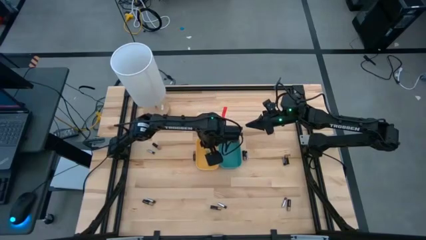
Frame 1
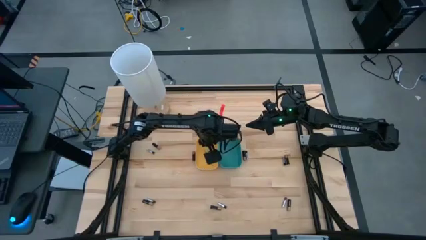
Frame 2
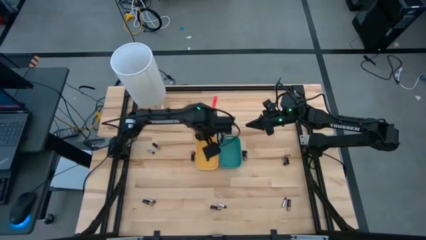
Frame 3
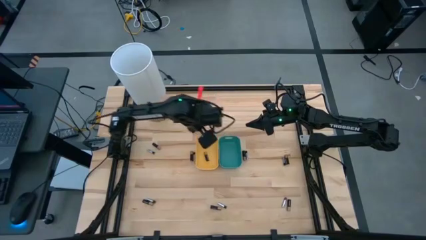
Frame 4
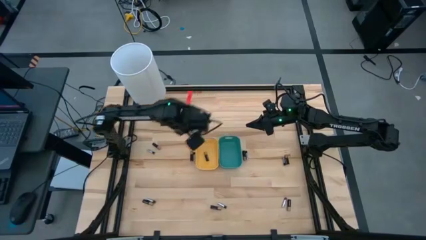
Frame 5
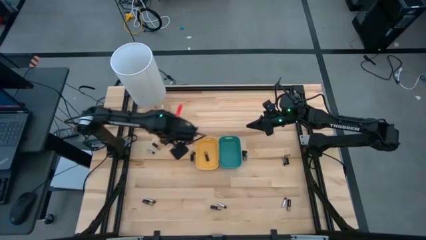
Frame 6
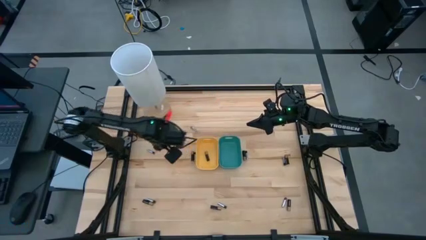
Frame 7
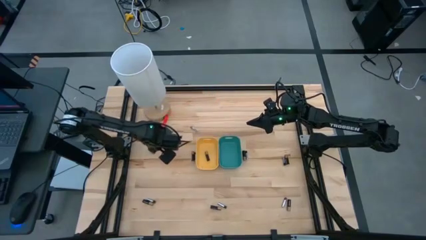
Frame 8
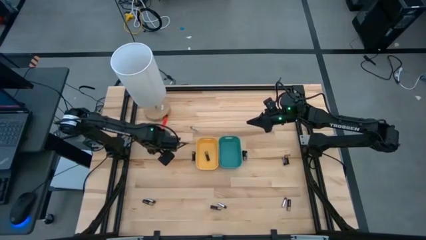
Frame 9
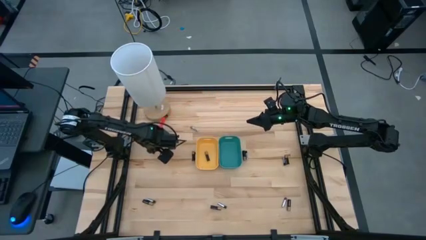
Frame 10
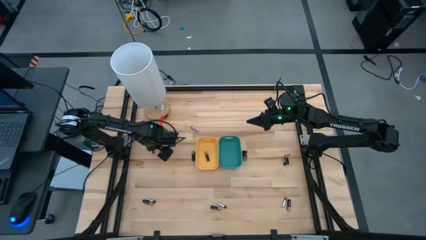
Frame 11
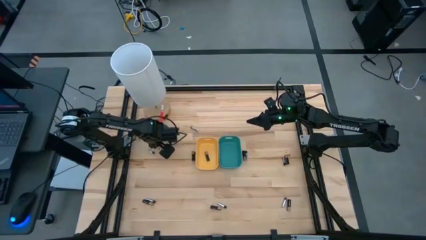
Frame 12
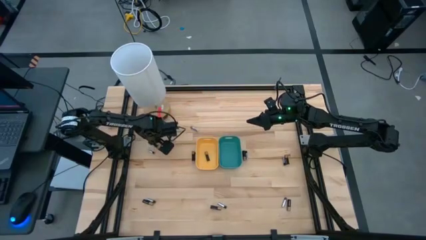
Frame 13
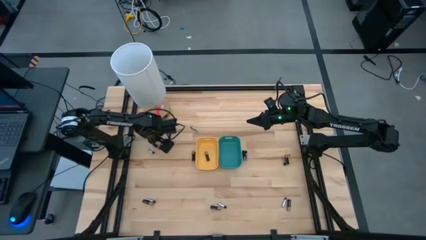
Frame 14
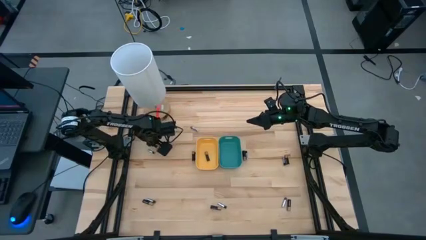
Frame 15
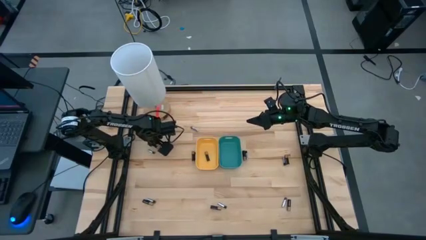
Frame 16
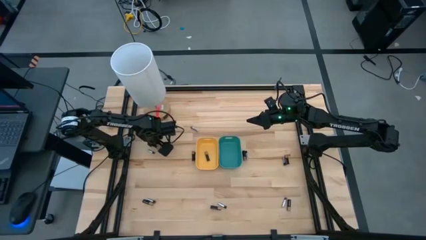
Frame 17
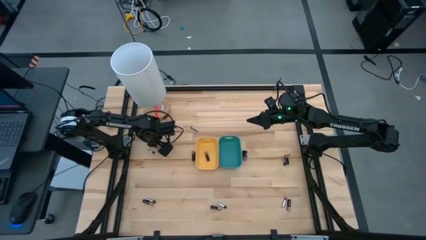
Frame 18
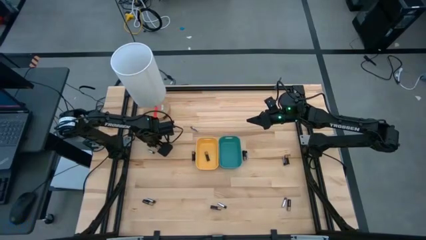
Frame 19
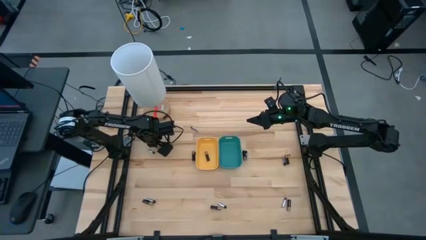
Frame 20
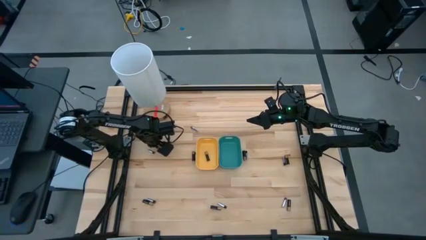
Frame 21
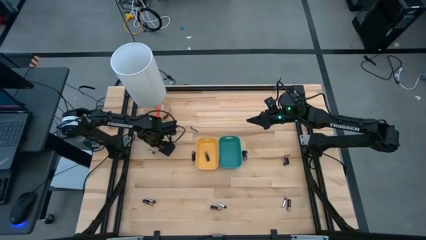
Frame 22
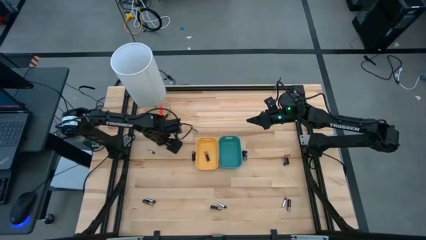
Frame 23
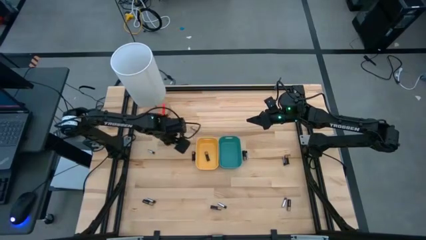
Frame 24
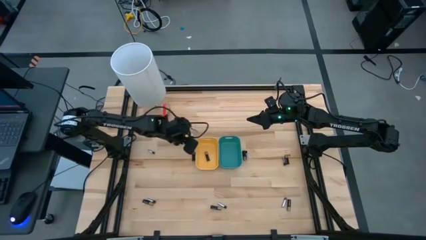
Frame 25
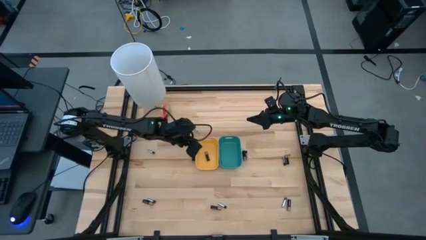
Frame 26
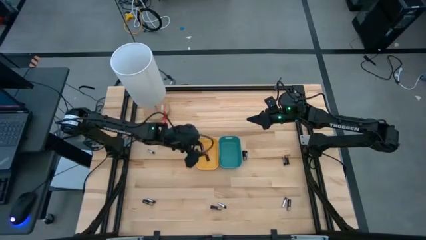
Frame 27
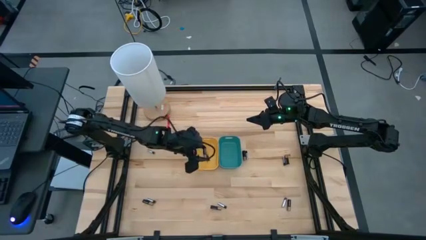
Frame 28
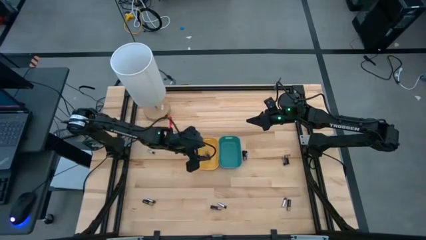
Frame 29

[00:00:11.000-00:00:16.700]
Task: Sort batteries
Put the black battery into the yellow bin

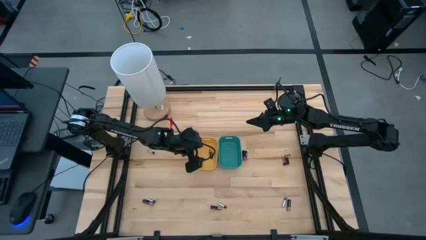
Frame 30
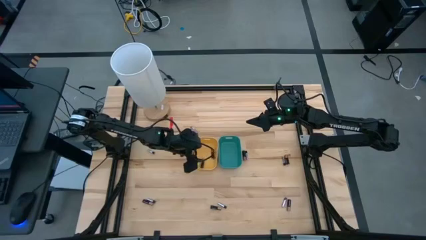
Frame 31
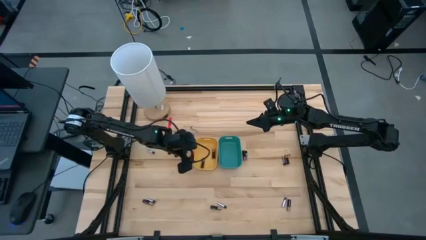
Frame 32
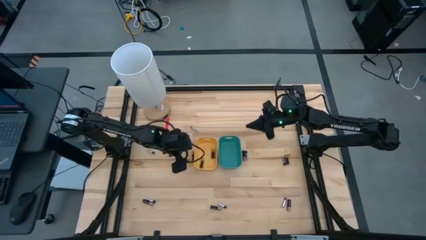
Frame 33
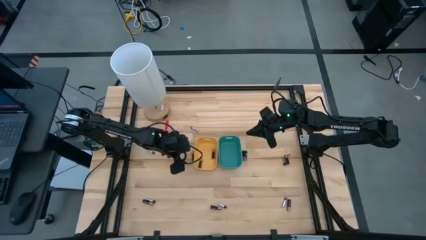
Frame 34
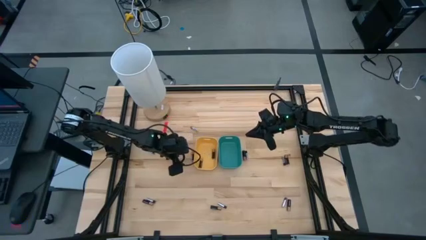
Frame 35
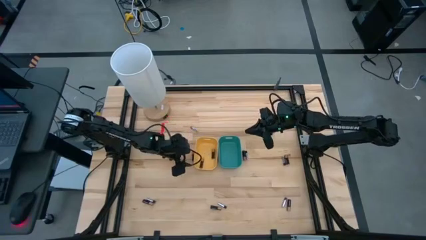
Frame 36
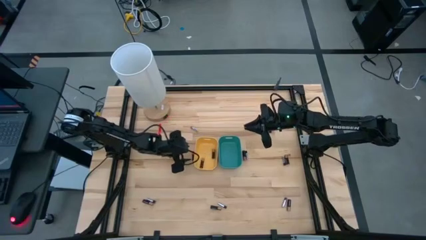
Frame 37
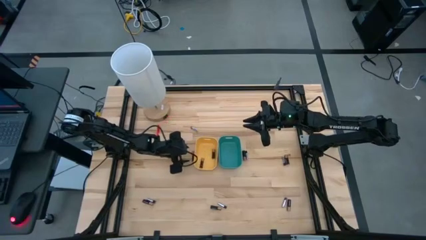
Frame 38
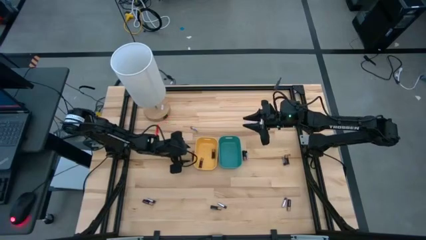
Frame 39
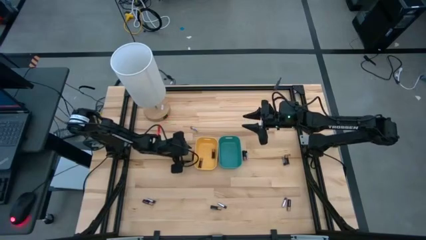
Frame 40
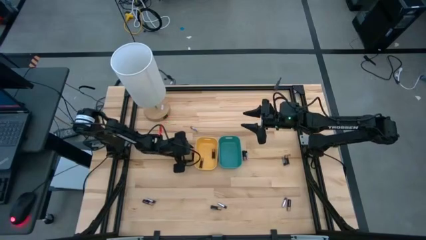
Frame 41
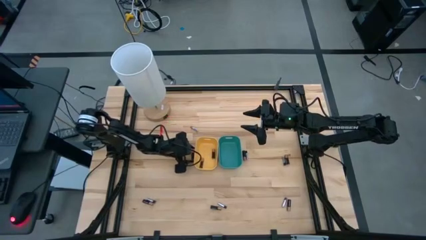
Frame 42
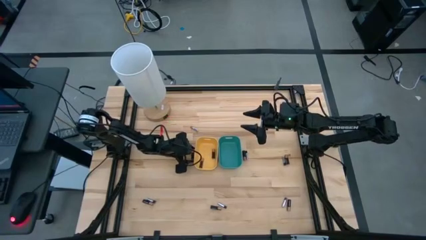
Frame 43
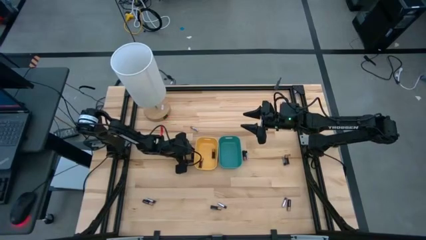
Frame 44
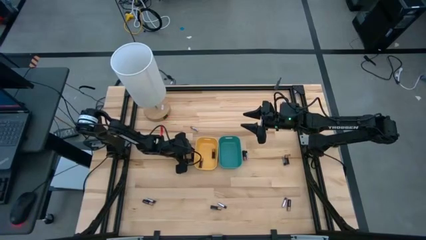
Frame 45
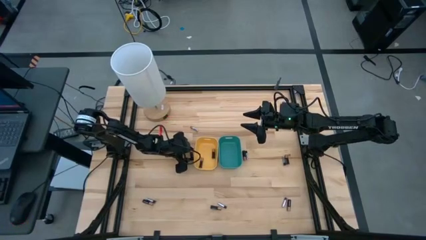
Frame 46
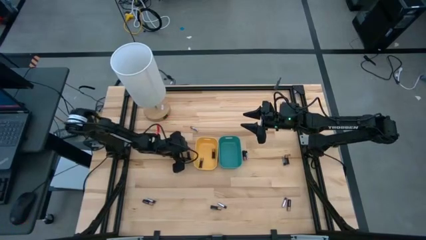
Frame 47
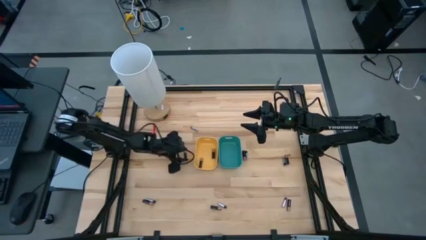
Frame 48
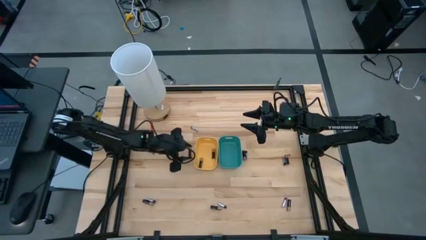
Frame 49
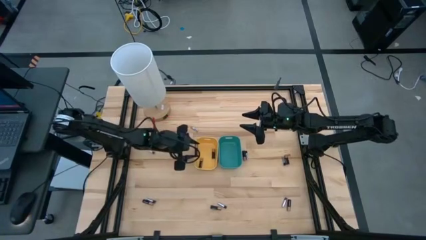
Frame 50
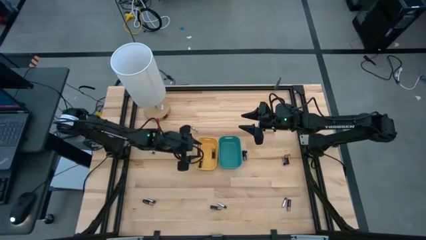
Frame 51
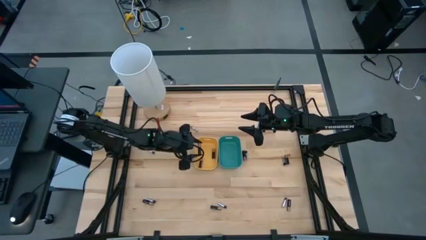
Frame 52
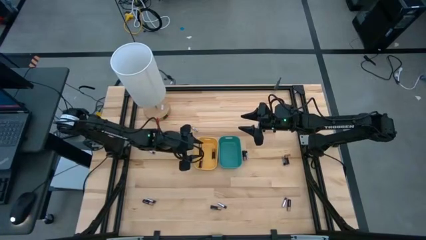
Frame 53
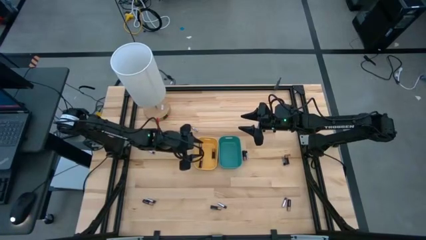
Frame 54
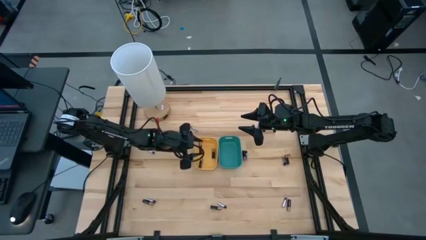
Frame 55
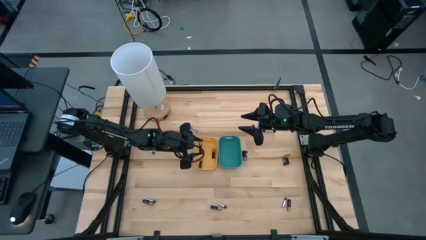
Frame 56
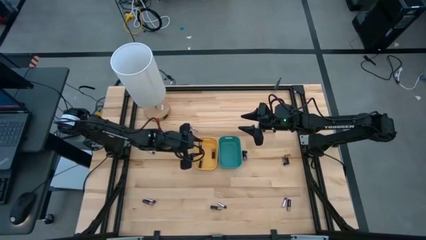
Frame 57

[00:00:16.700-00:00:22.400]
Put the black battery into the yellow bin

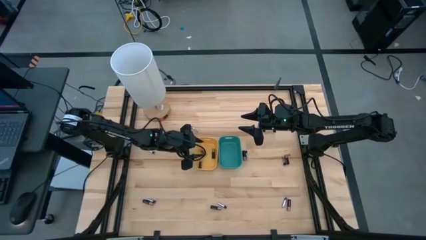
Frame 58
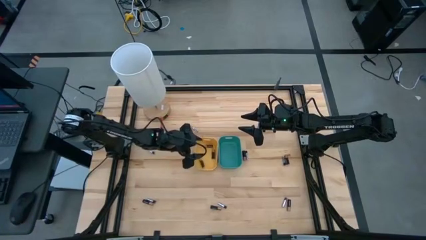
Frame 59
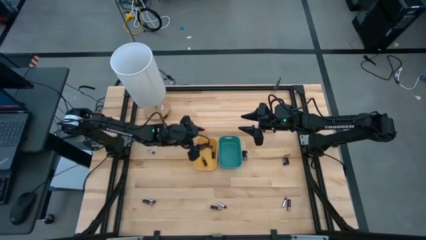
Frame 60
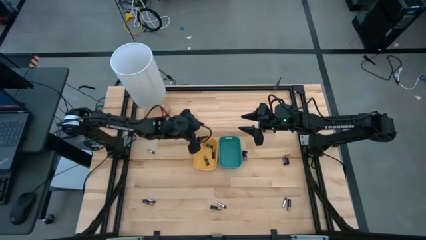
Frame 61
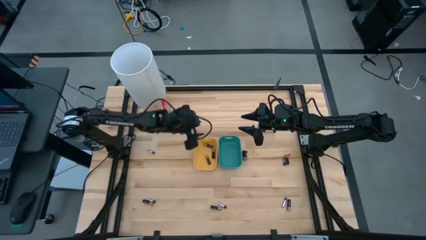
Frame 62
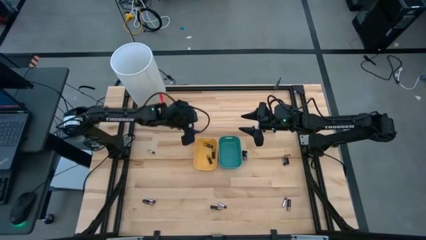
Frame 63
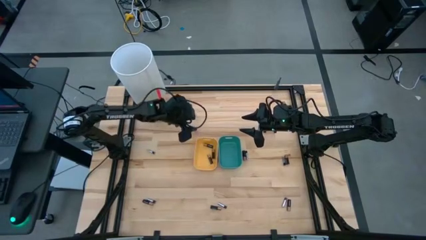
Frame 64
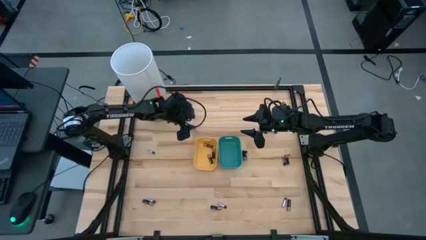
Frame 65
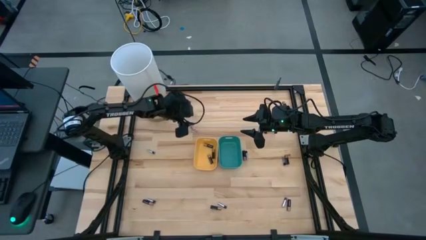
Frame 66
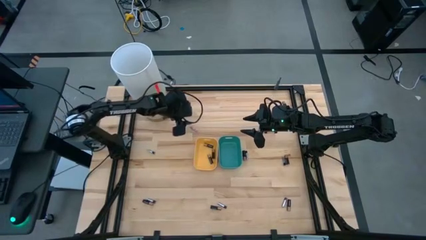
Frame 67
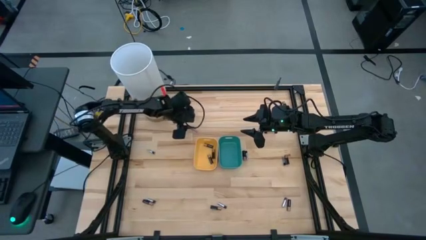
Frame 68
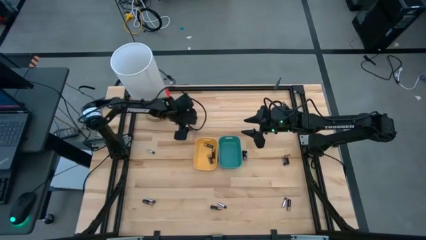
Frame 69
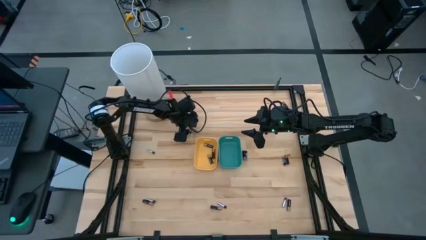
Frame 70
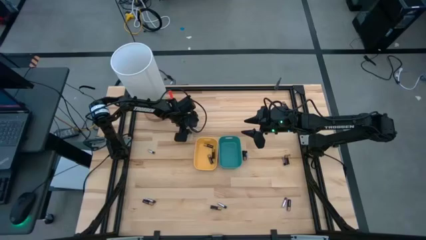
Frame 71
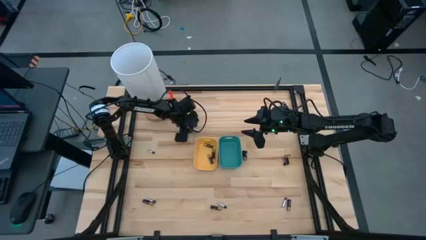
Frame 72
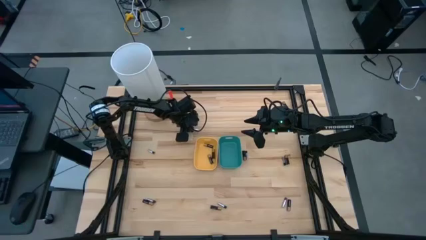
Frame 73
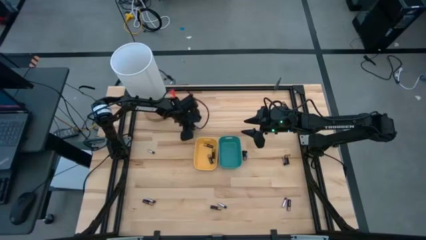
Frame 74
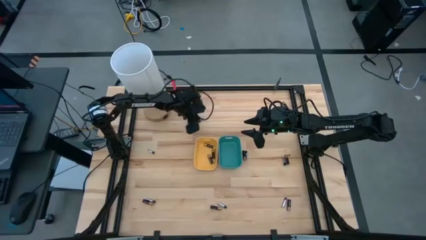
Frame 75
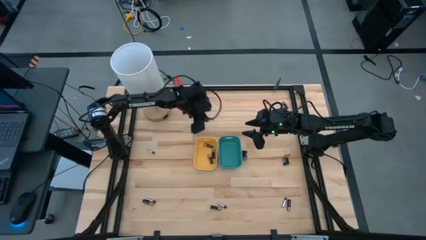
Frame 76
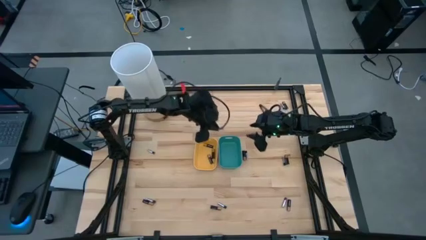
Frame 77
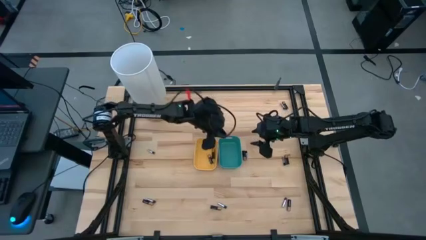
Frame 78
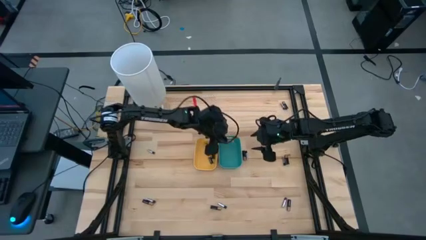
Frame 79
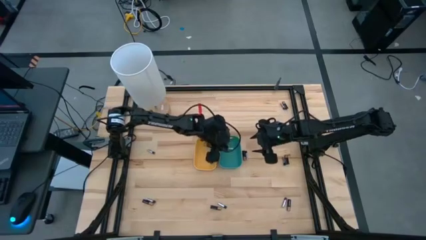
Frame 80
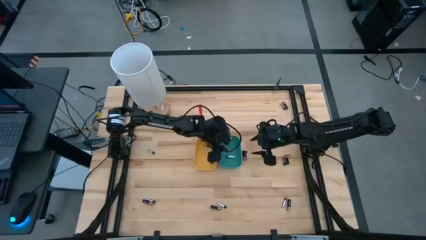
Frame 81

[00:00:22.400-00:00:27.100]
Put the silver battery into the blue bin
